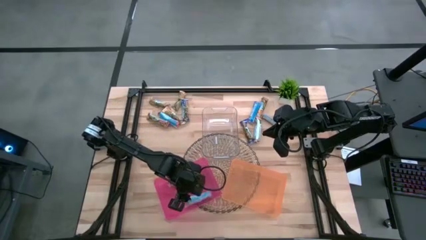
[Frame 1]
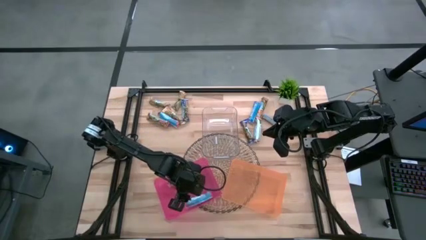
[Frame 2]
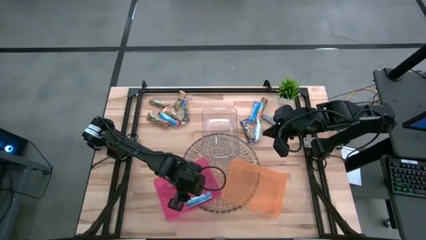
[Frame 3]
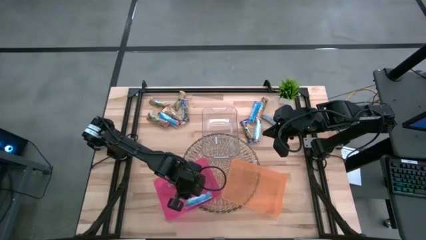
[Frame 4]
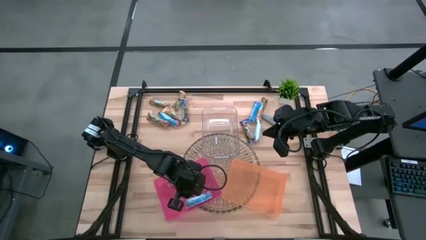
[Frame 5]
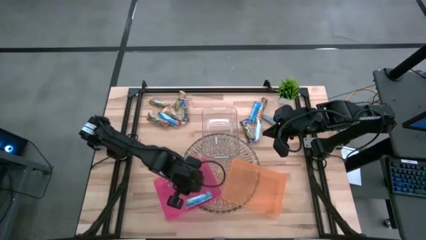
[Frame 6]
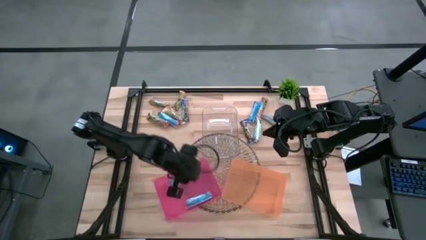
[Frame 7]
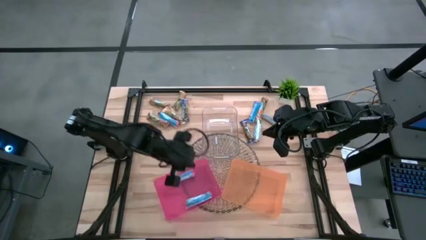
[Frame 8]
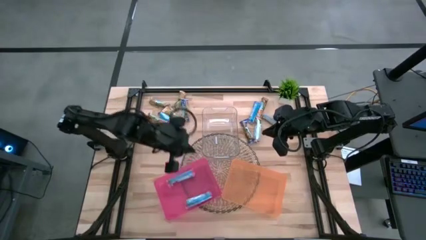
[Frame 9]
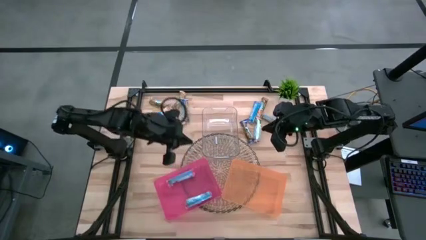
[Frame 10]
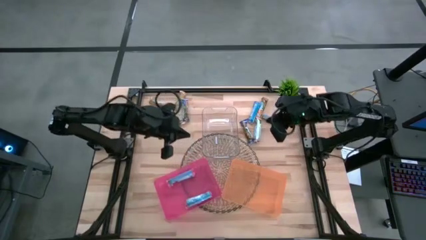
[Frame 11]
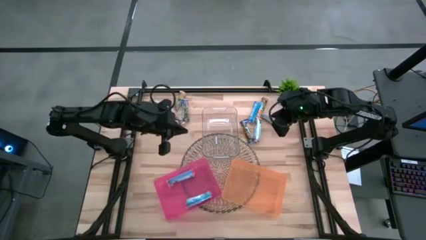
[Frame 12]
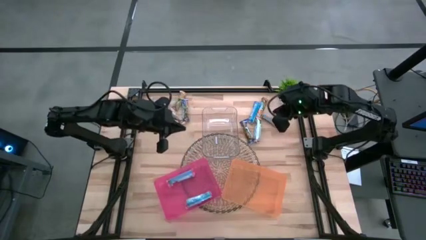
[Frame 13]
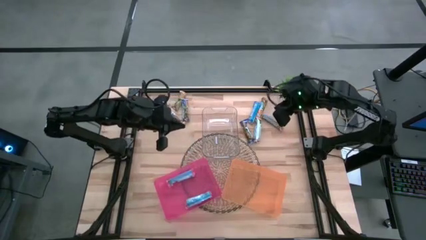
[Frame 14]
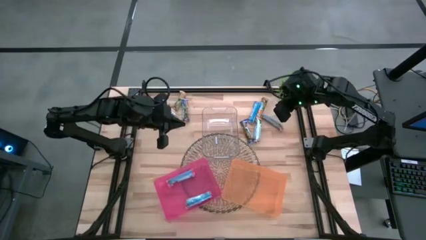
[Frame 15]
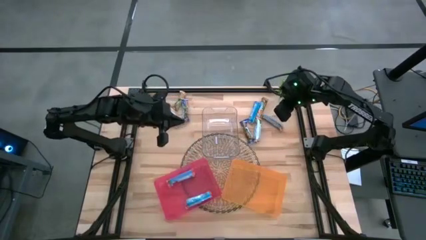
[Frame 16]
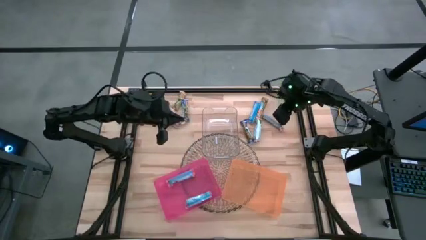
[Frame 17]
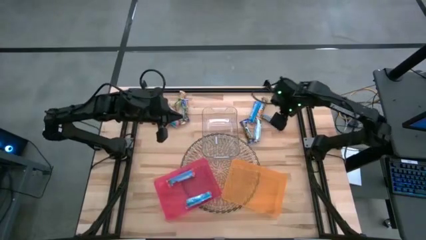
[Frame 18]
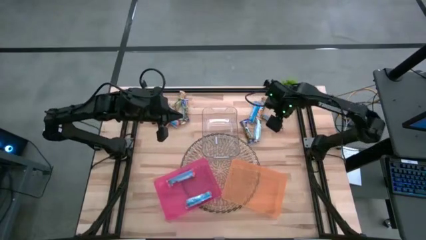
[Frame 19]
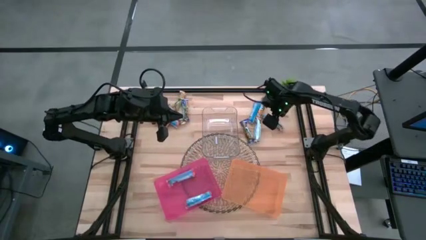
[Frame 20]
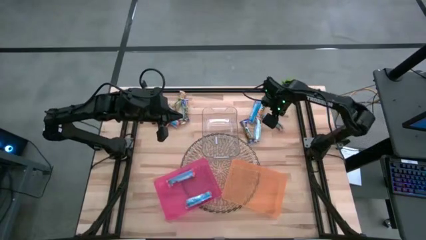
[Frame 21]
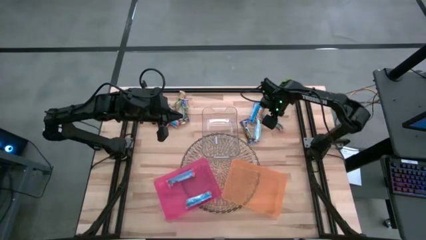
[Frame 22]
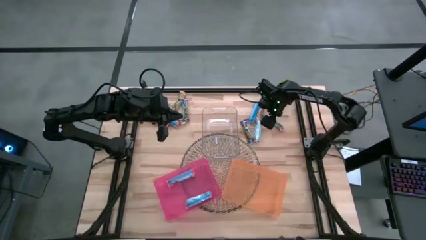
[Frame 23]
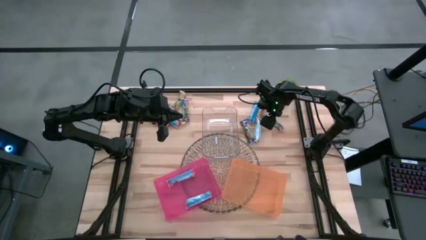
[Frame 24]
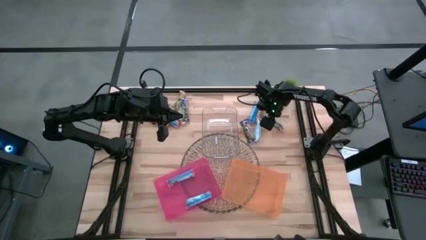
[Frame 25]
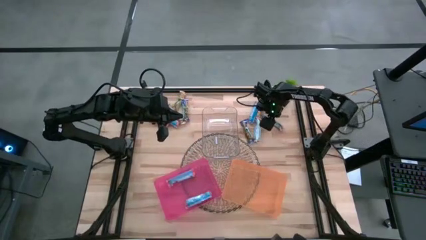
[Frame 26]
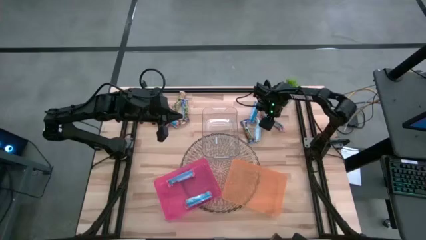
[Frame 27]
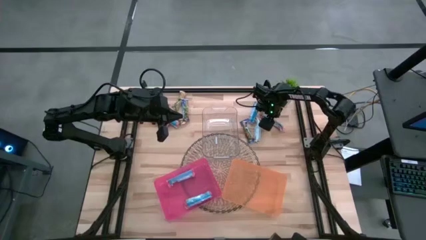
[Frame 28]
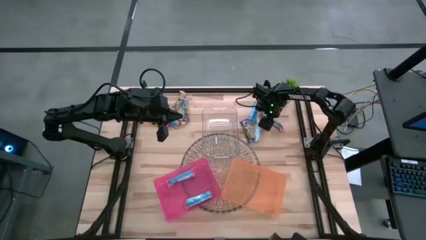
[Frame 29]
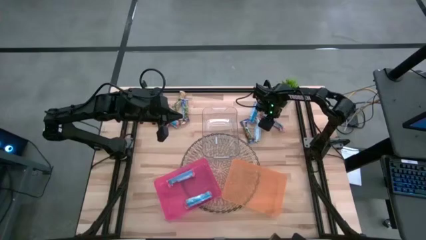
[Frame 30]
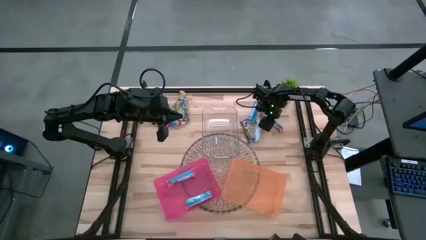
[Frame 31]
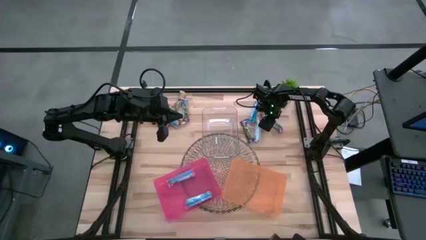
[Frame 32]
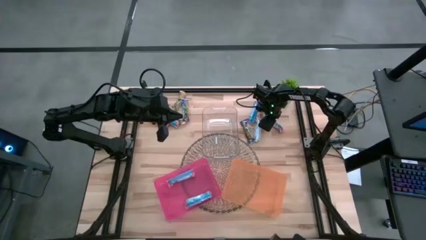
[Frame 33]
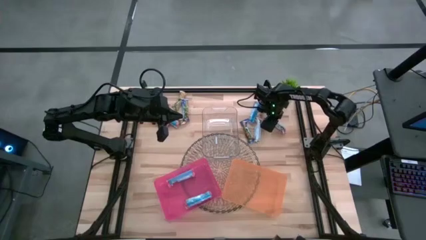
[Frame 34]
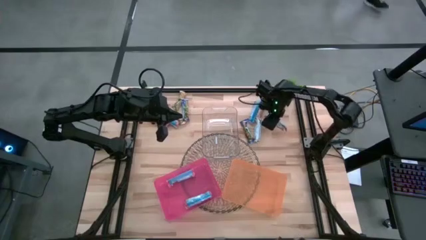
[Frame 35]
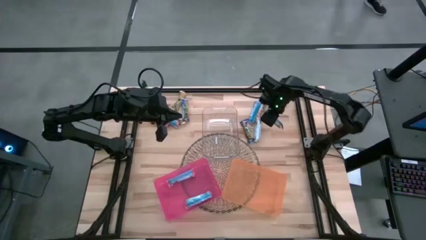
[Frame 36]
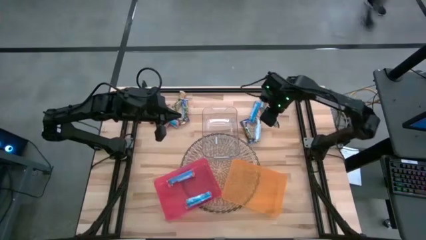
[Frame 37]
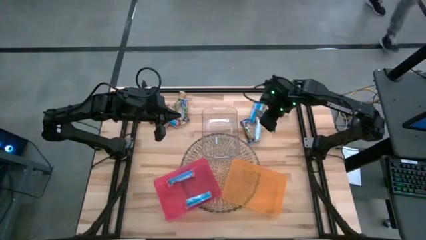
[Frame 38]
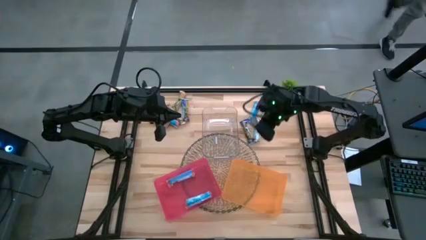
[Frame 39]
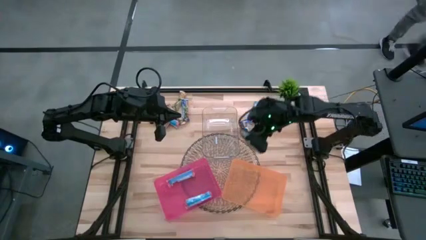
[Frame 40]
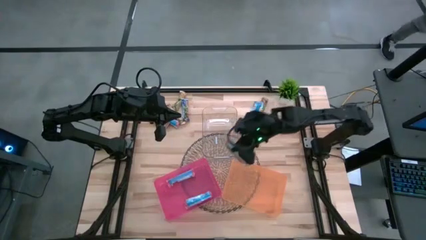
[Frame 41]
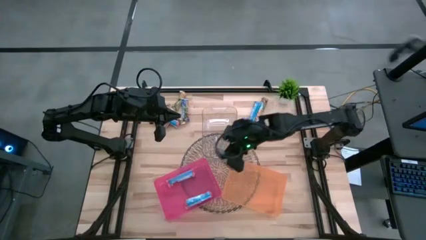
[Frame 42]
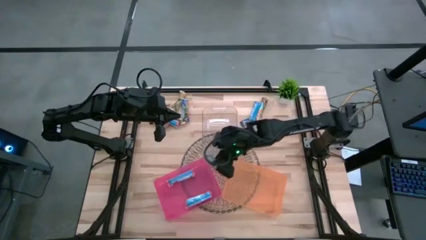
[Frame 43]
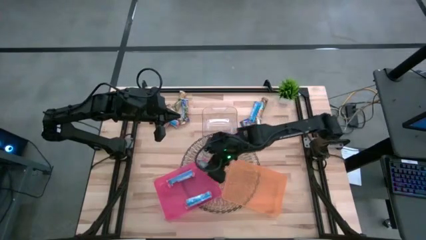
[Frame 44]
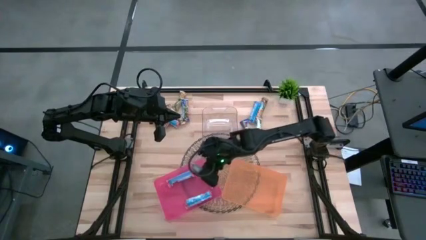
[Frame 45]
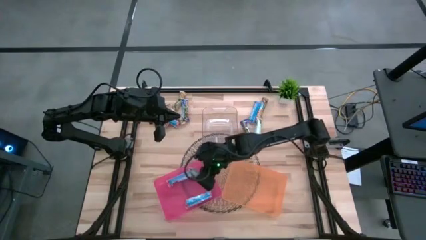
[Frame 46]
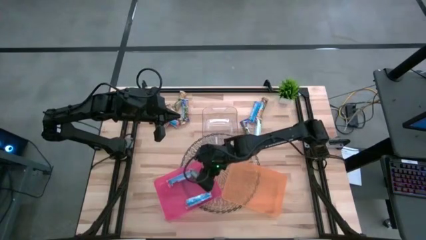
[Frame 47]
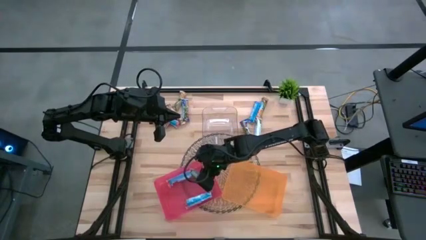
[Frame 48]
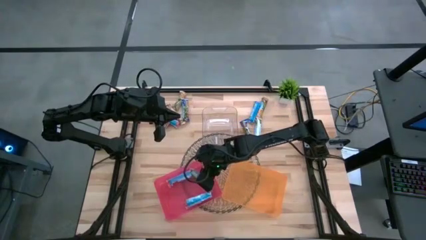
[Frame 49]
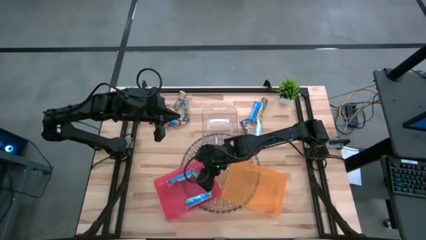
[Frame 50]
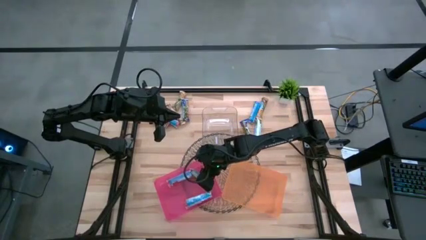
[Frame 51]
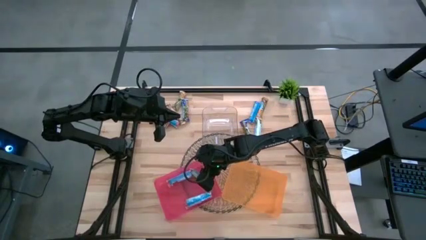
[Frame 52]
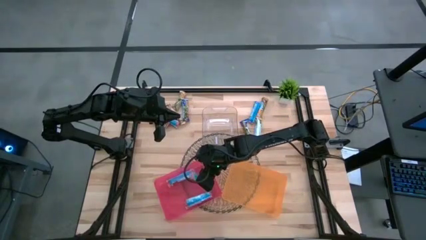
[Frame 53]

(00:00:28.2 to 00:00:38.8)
Task: Pick and place Granola Bars by type
Put the red granola bar into the red bin

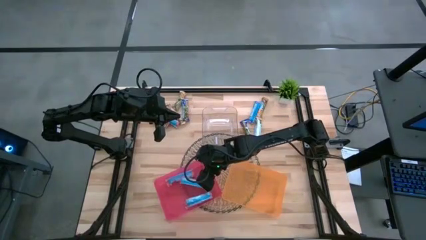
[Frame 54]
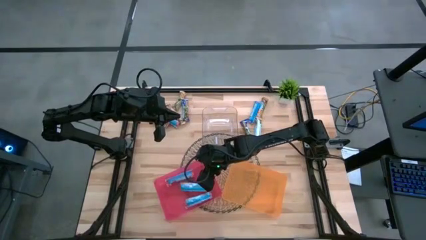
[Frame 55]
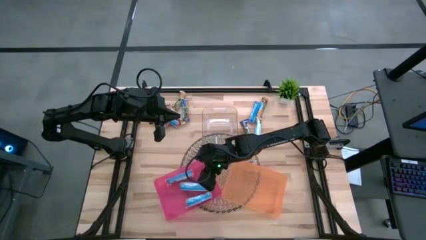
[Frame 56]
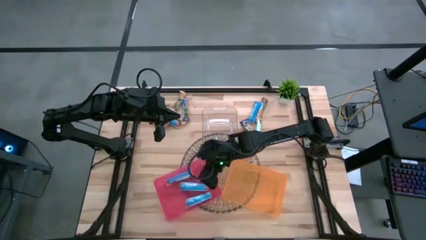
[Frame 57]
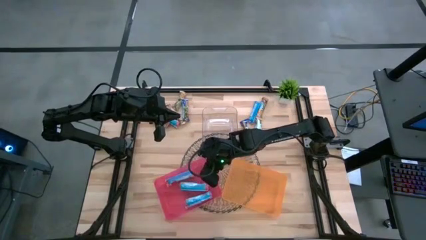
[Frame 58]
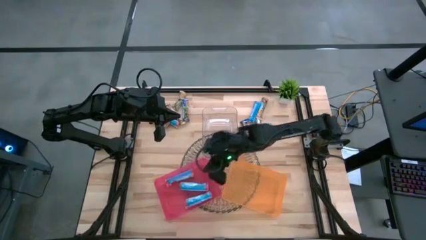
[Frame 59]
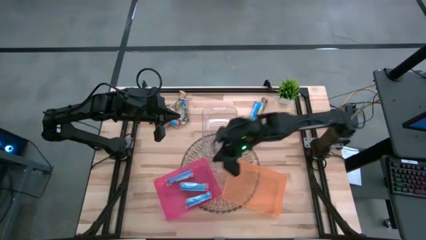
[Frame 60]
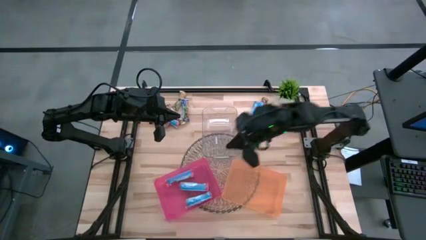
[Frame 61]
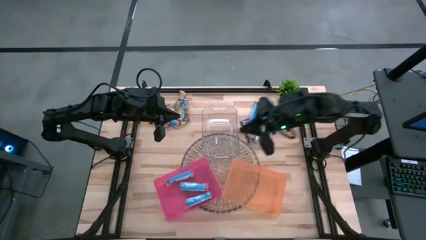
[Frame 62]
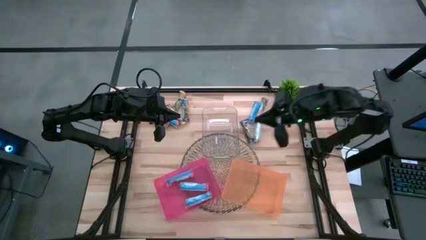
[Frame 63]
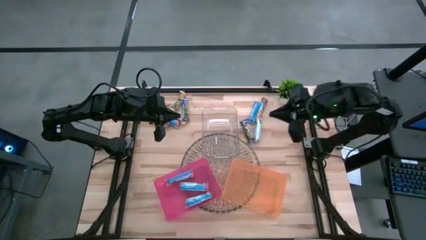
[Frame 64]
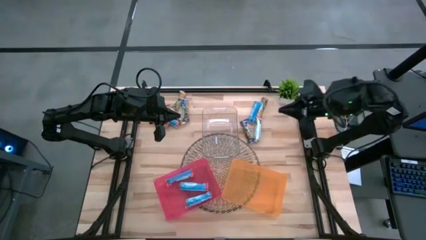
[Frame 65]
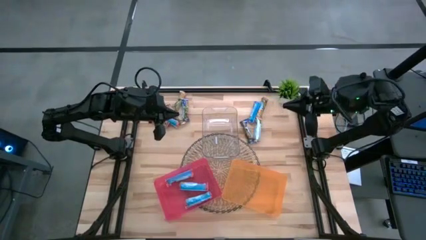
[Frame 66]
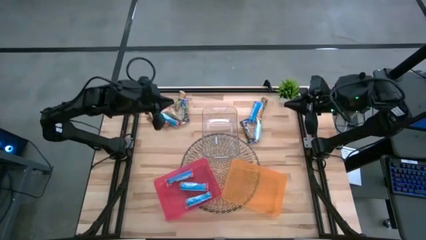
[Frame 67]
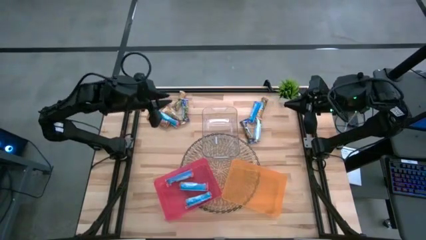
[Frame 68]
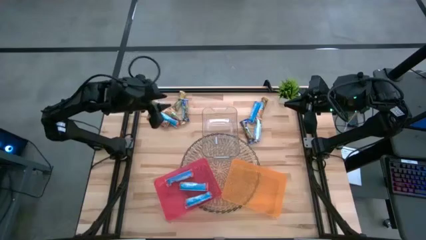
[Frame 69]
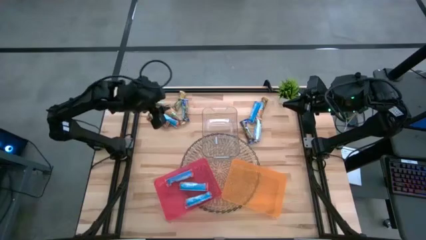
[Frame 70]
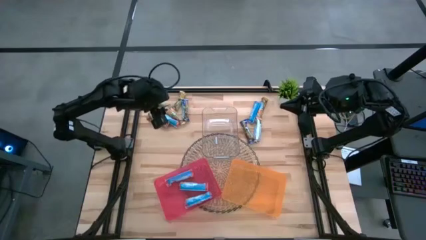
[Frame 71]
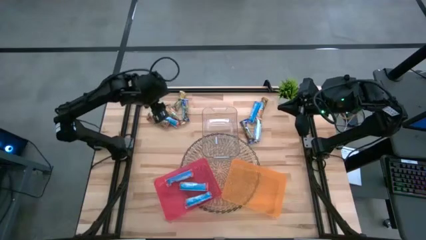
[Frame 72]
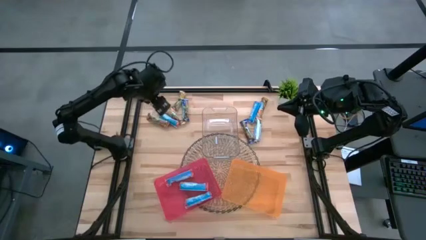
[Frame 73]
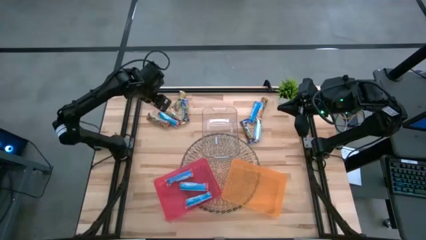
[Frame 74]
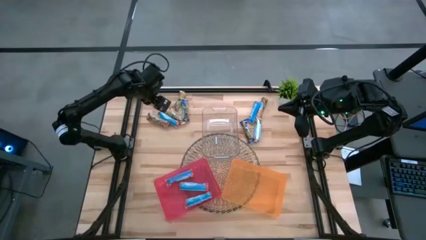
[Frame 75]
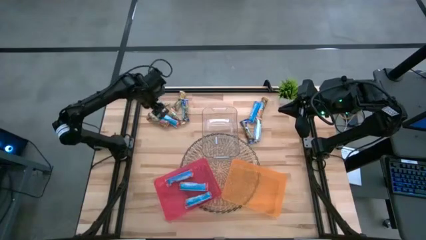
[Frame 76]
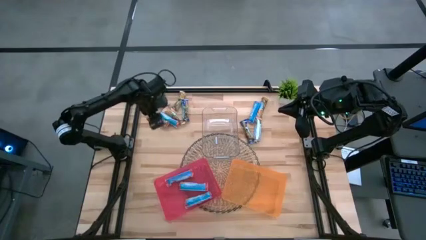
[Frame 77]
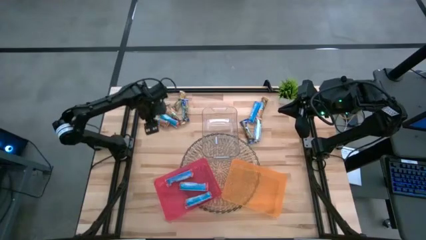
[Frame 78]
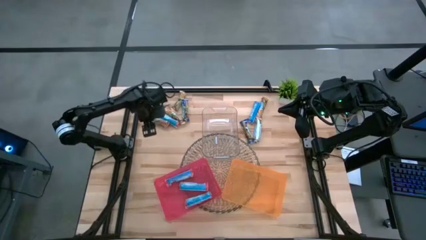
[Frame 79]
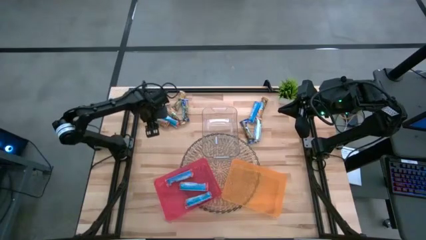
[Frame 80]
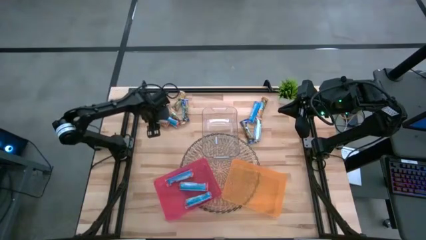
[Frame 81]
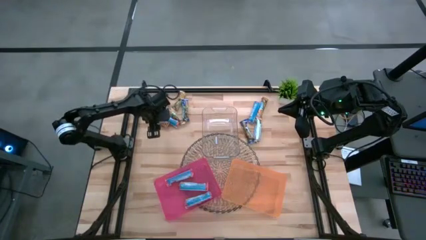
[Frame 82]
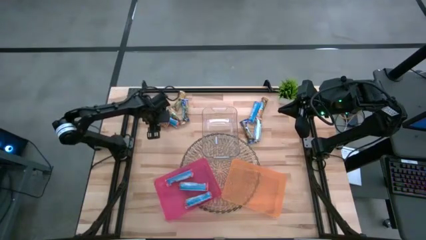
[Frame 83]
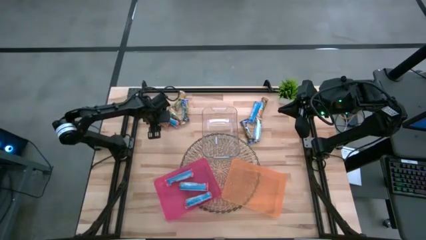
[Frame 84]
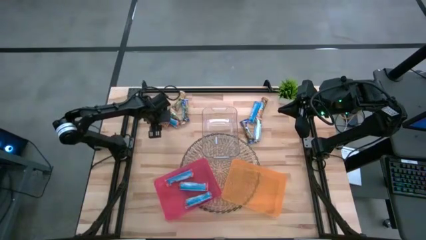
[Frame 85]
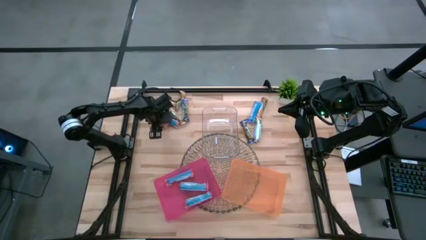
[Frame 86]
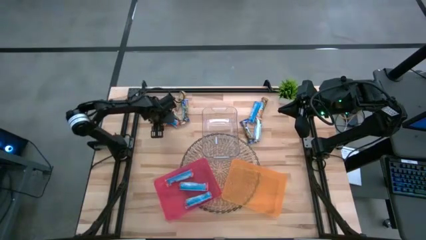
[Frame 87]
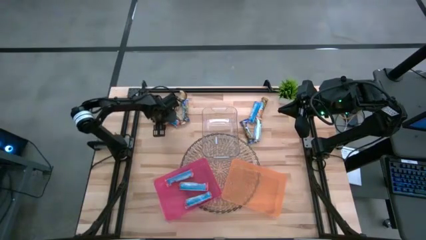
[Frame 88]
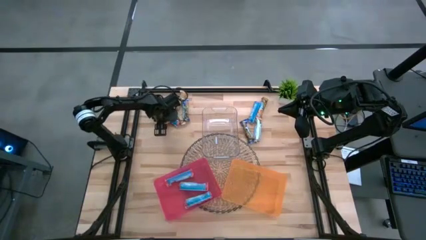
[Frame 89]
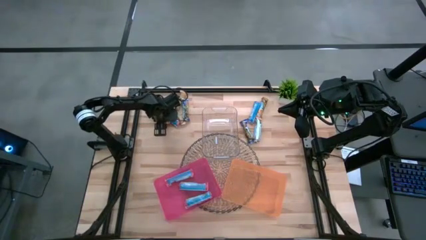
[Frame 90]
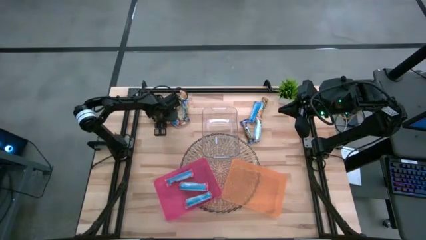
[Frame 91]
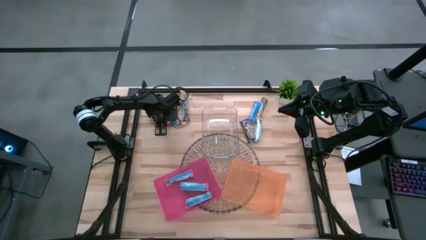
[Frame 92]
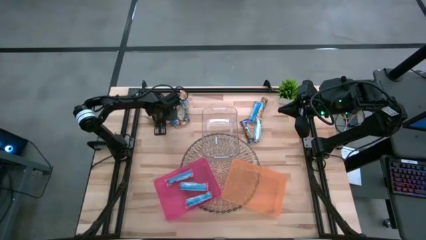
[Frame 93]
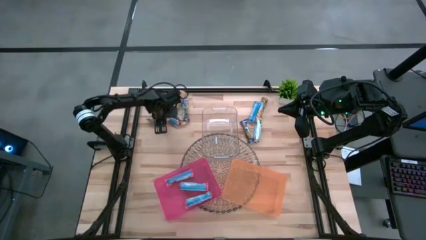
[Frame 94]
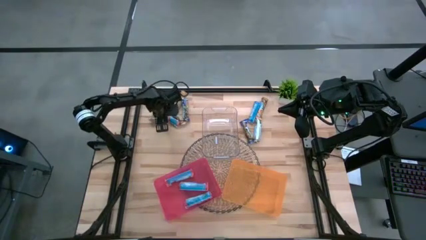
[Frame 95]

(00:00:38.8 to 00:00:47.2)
Put the red granola bar into the red bin
